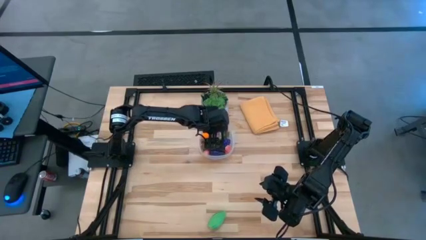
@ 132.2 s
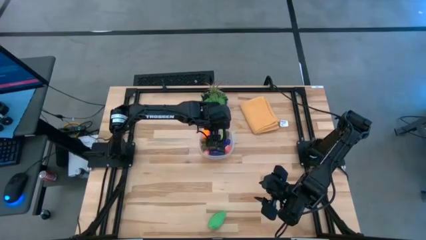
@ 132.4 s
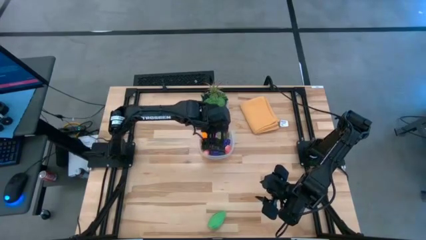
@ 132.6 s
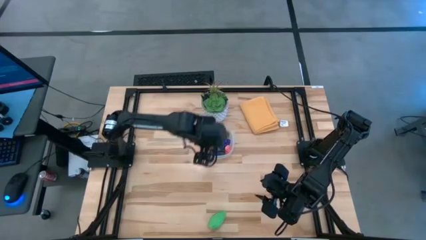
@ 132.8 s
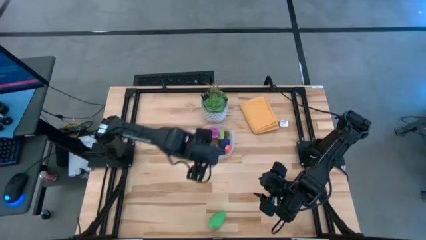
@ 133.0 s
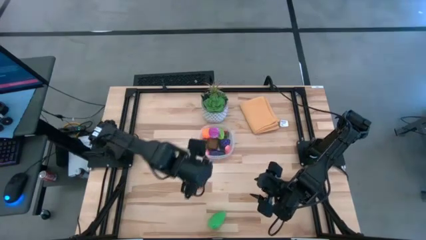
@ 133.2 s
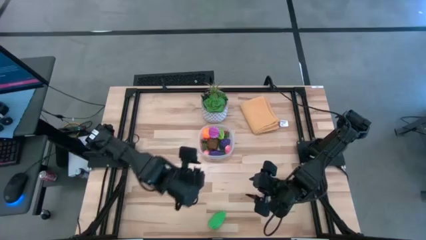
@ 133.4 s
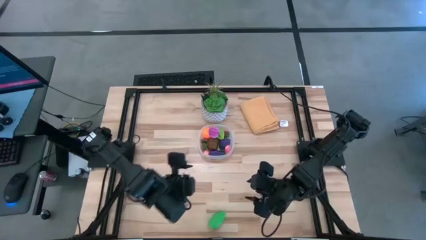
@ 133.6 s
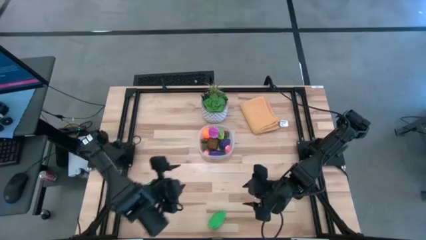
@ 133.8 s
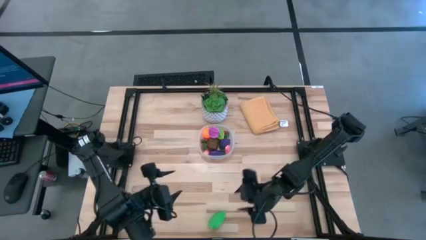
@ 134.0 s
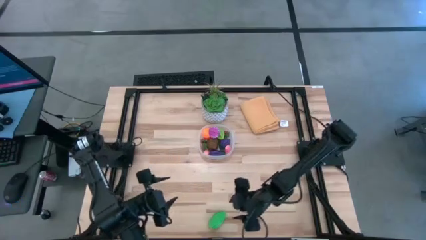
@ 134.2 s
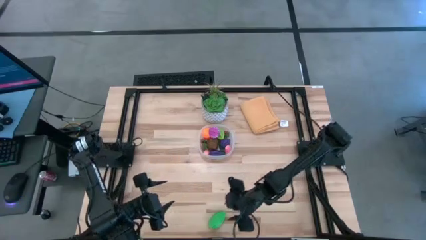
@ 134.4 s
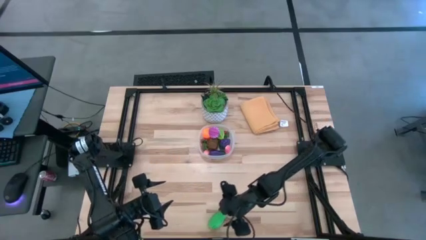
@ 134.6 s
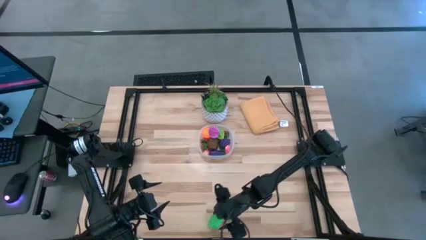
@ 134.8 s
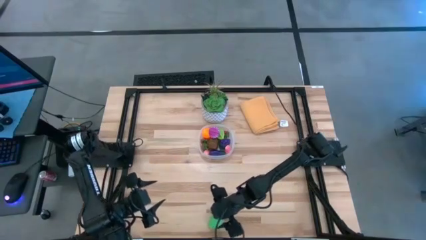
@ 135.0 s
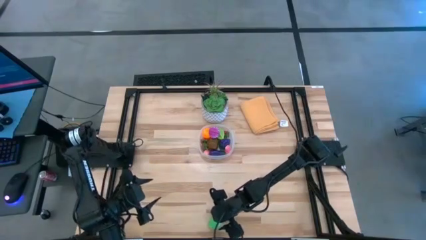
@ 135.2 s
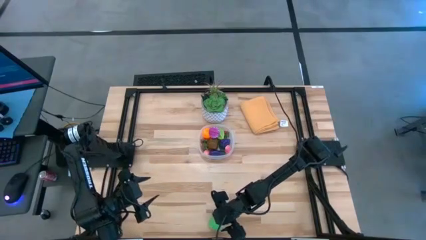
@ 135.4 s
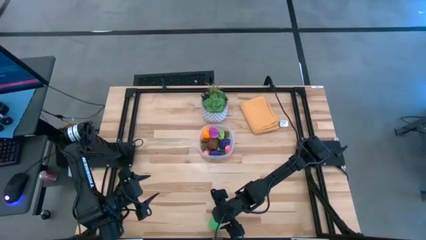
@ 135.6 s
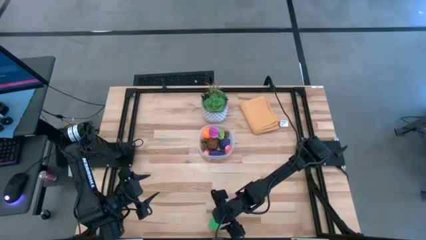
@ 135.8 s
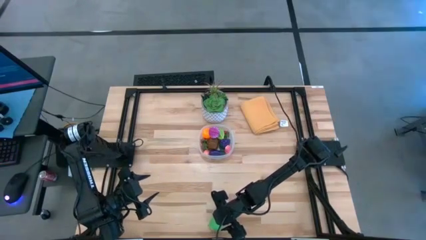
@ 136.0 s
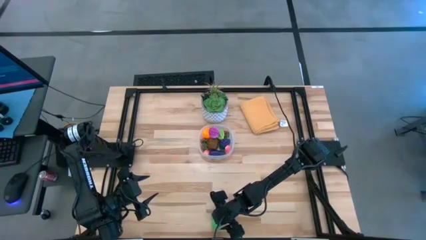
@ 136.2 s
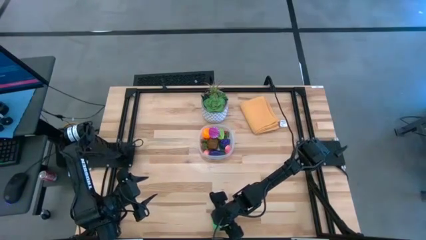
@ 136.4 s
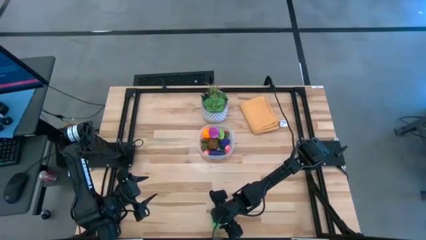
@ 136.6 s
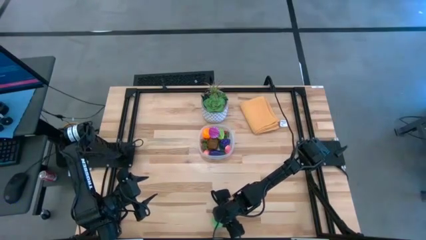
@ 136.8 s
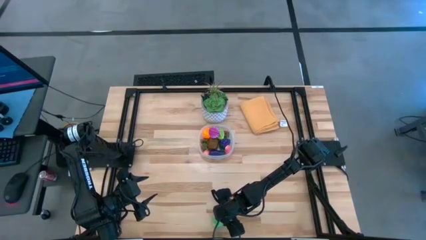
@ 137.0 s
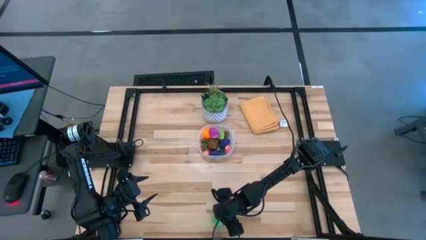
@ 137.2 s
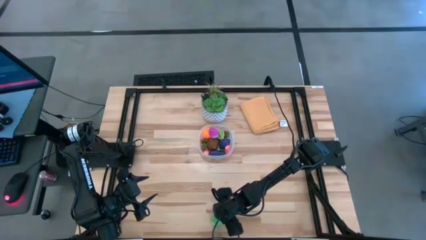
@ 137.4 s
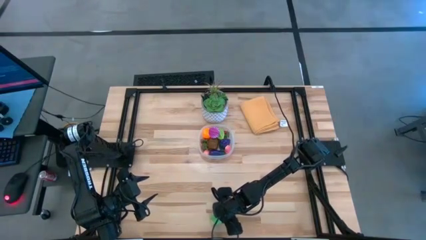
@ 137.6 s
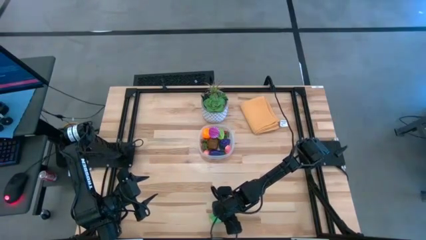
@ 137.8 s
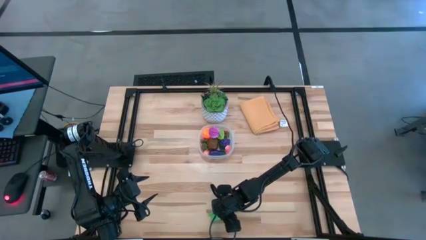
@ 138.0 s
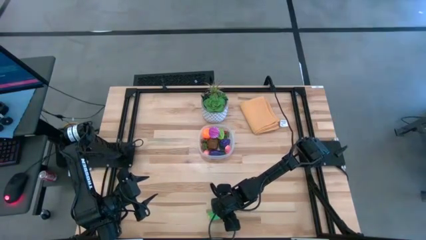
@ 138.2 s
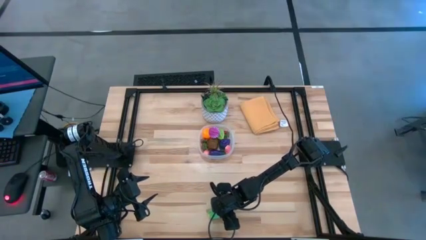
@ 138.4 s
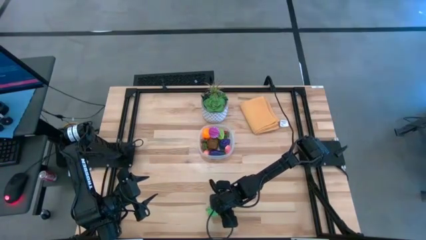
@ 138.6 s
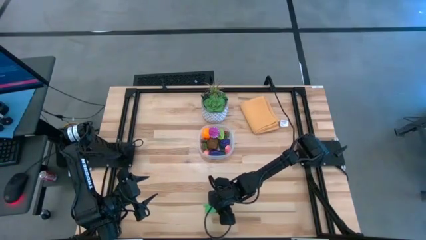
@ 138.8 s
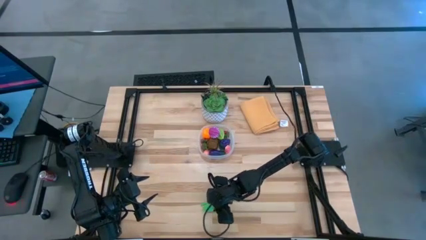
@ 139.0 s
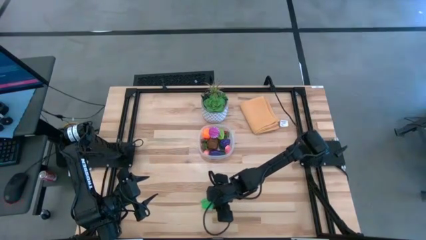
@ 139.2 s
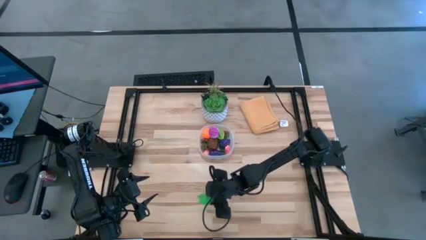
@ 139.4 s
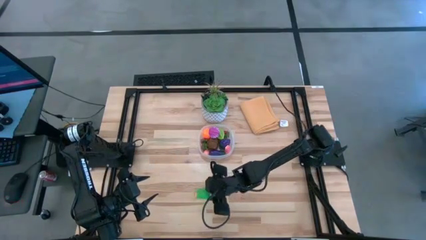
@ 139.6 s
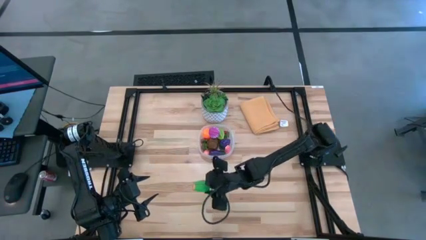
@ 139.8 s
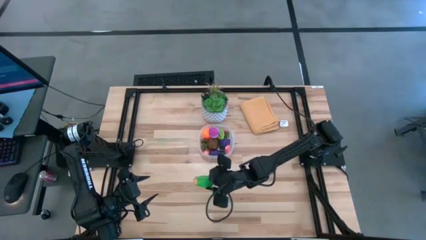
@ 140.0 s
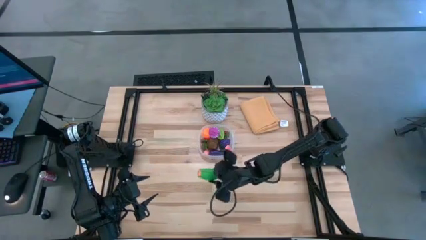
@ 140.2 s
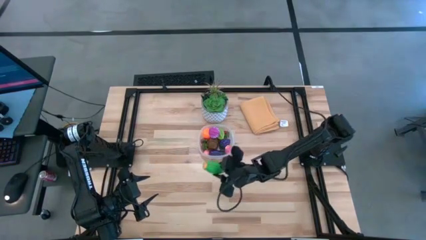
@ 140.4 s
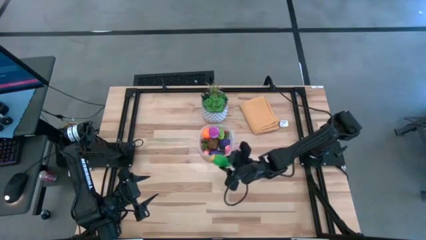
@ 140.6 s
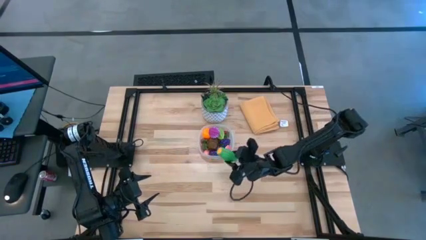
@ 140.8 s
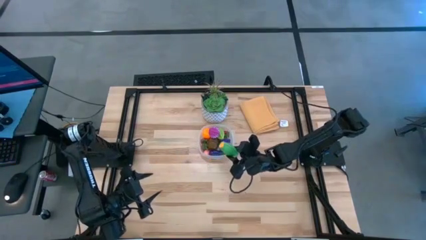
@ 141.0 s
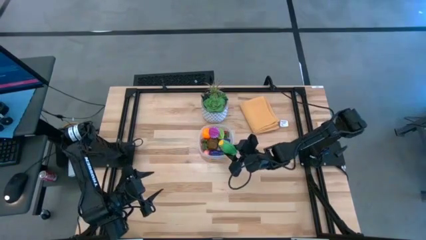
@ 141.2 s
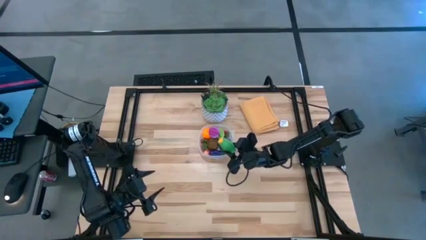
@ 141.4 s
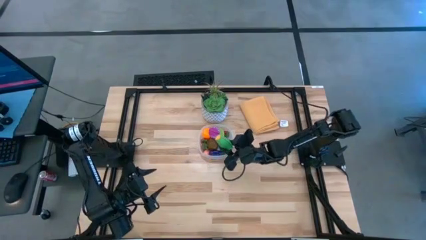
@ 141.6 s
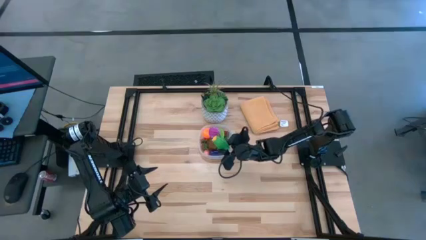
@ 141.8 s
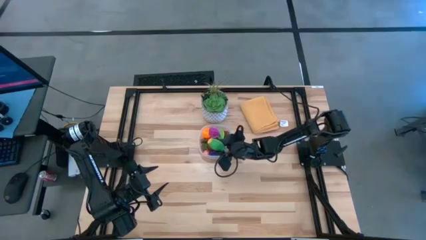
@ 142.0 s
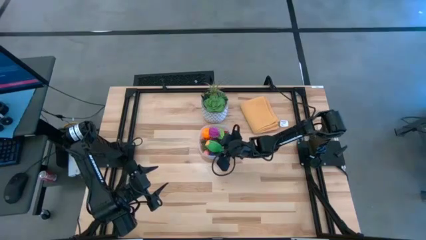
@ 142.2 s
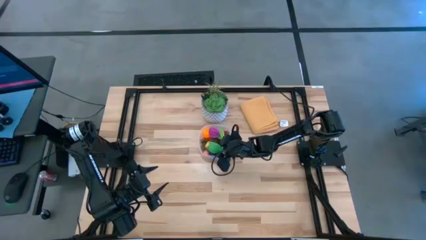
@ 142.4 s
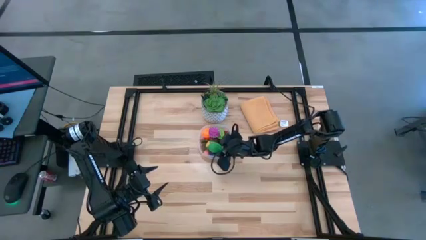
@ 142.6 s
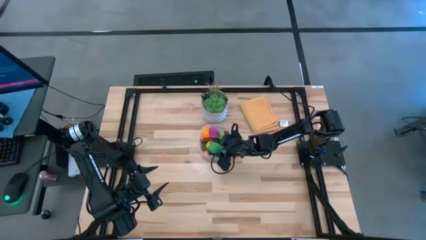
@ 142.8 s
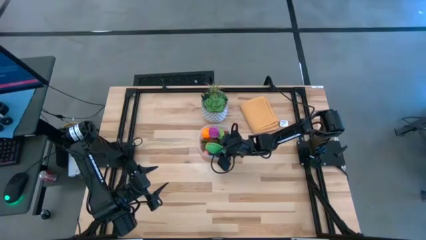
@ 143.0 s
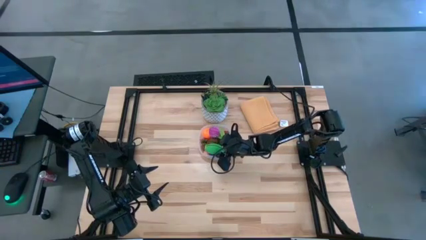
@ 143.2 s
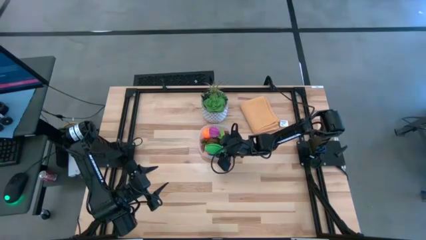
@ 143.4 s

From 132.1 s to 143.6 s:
Task: Pick and placing Produce into tupperware
Put the green corn into the transparent bin
